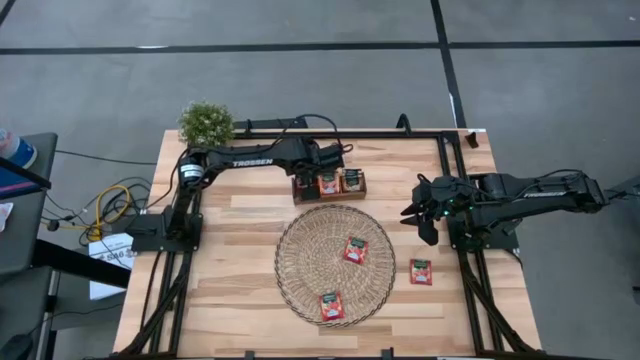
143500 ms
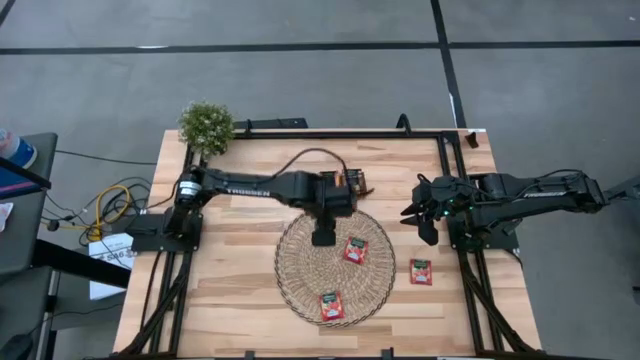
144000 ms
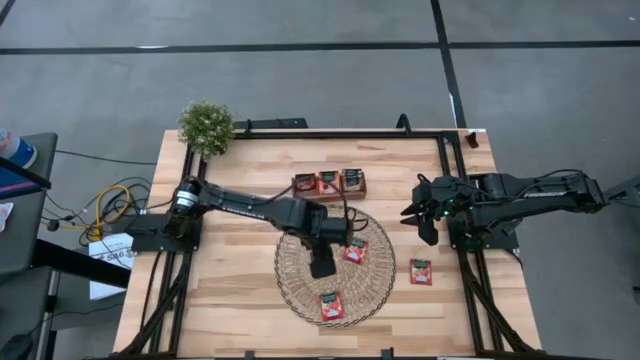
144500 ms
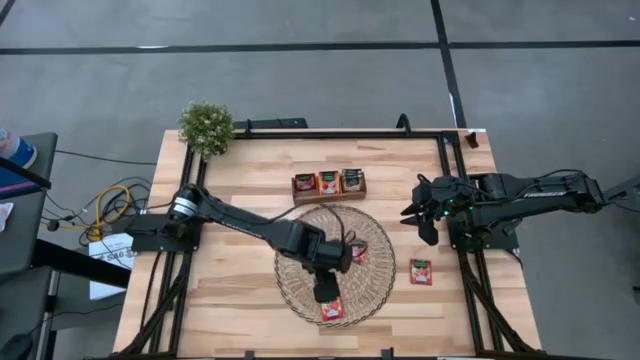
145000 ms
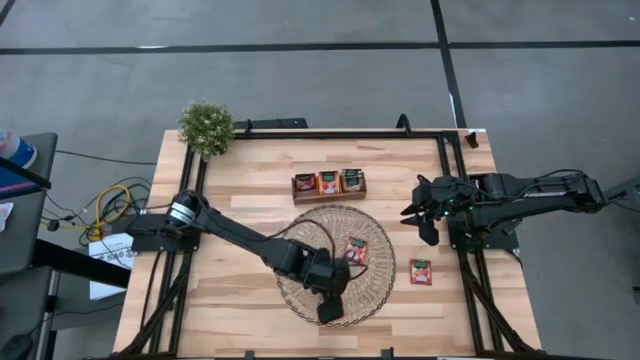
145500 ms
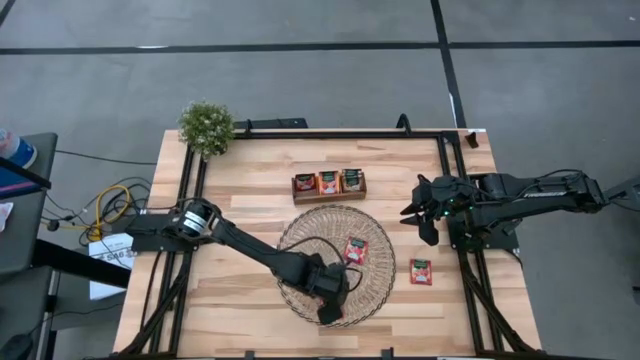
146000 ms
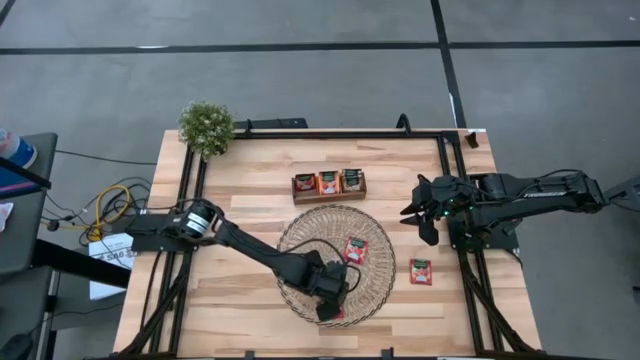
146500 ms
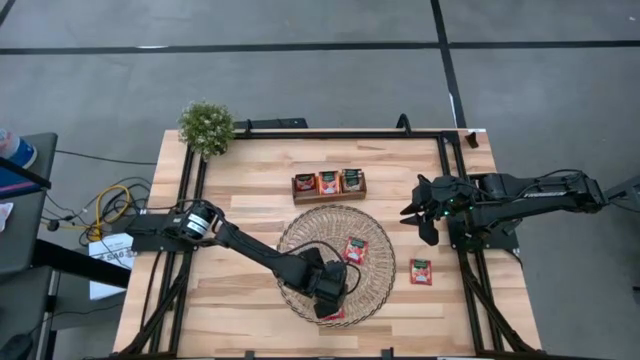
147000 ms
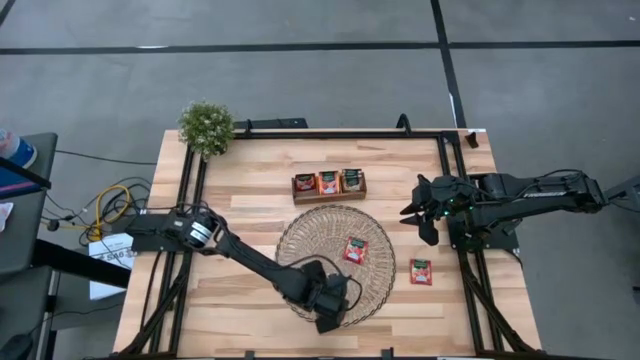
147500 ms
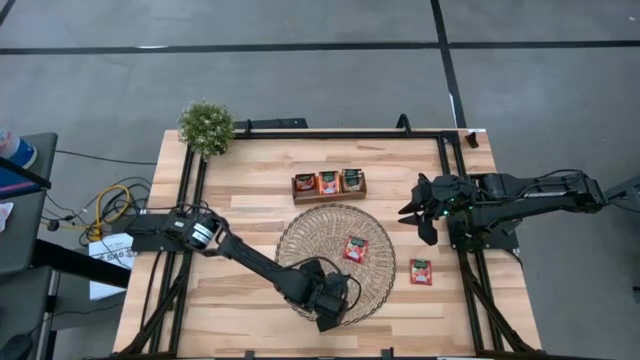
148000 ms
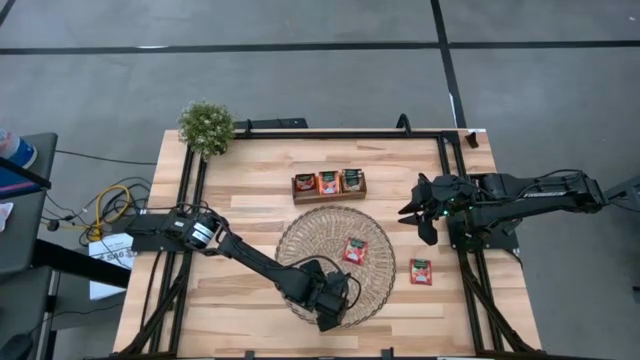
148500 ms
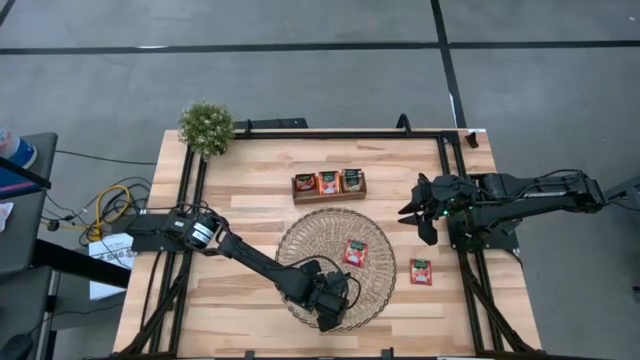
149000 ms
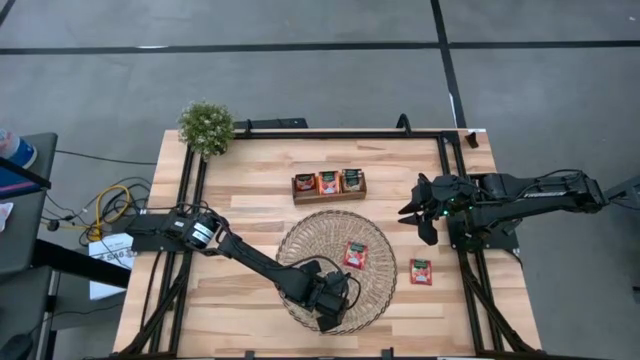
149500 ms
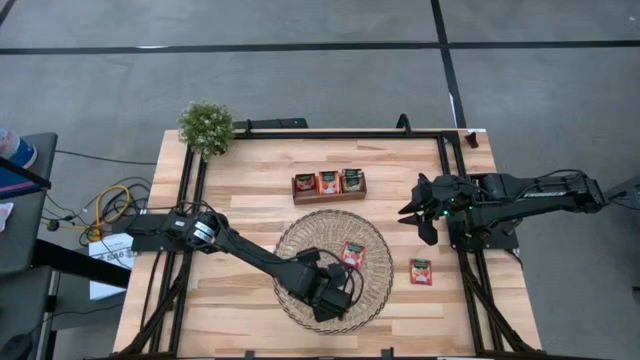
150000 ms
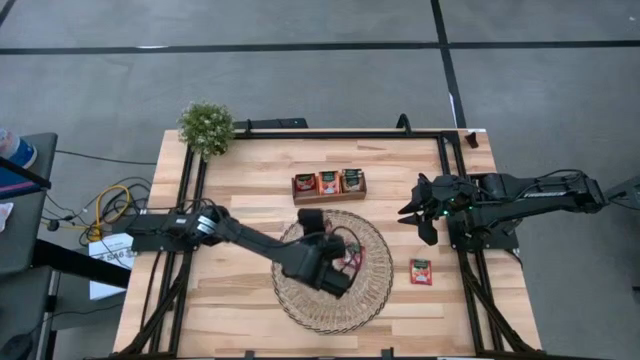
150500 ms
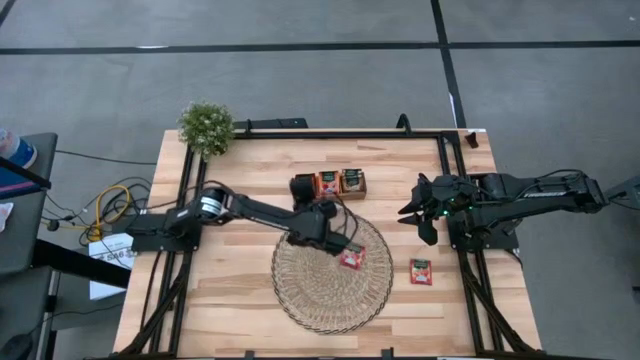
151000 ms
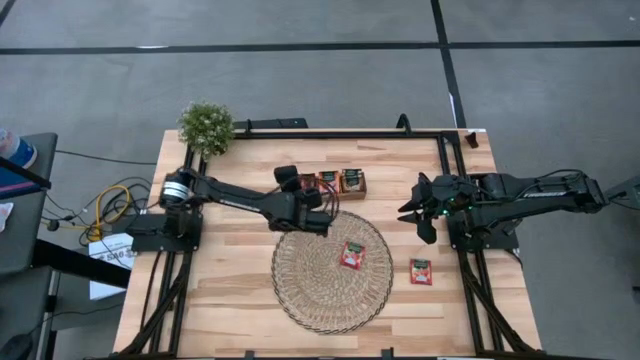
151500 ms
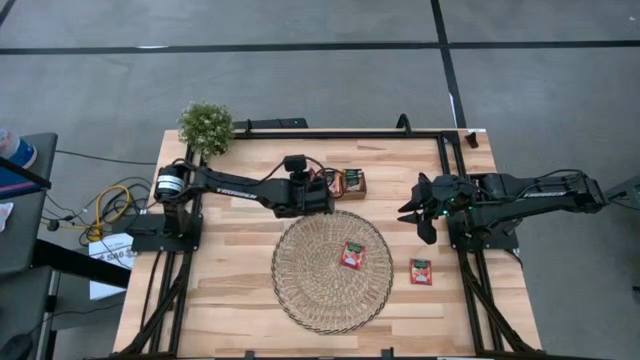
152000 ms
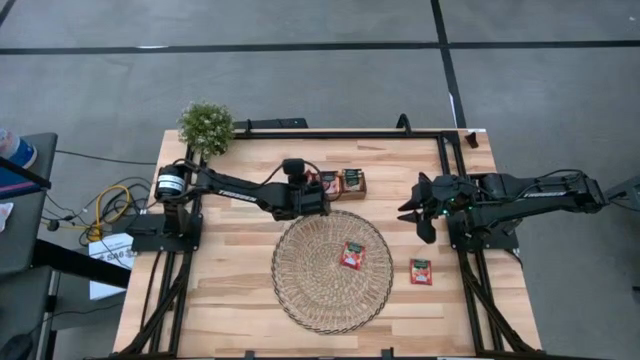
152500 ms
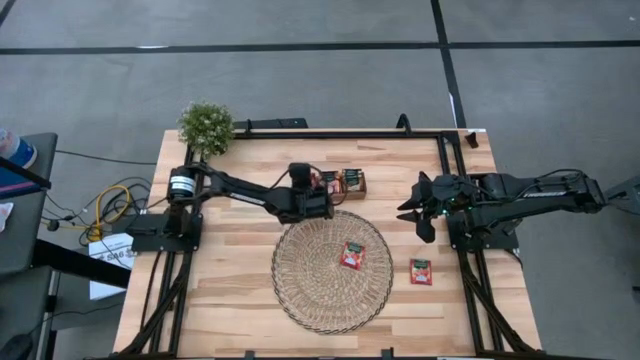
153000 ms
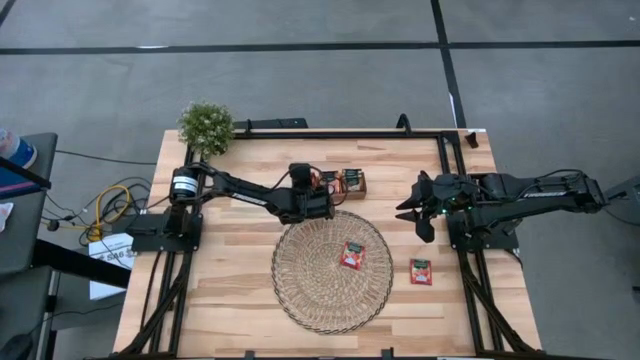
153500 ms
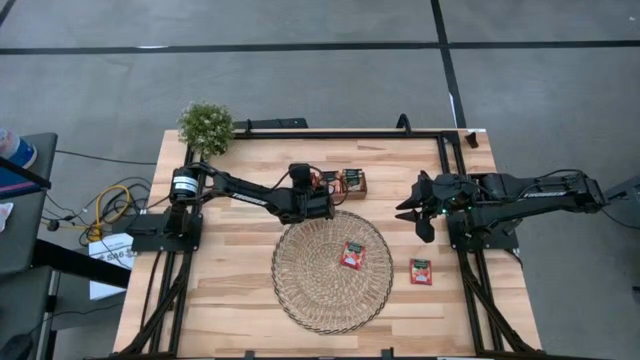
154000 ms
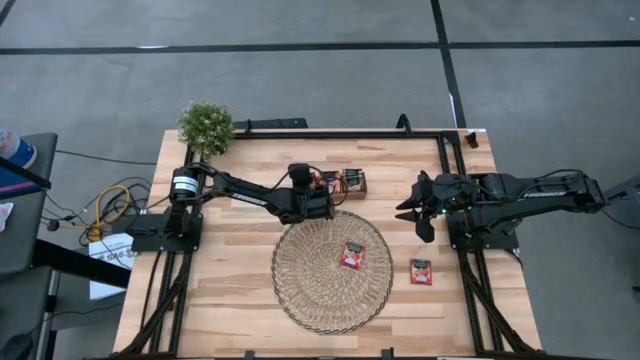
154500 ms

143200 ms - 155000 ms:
Task: Pick & Place Tea
Put the red tea bag into the wooden organizer

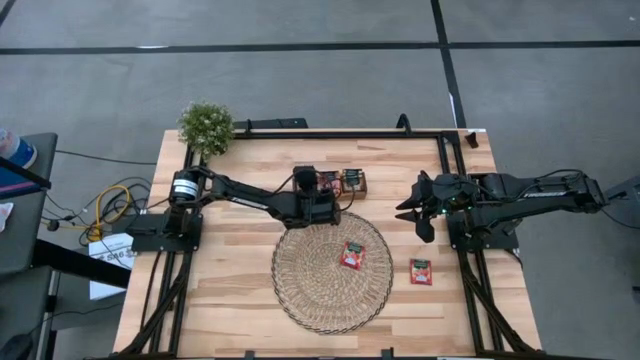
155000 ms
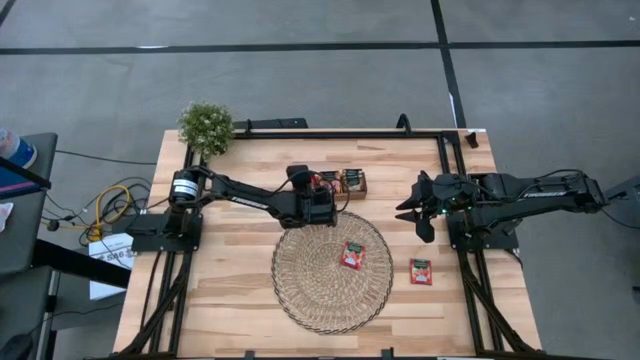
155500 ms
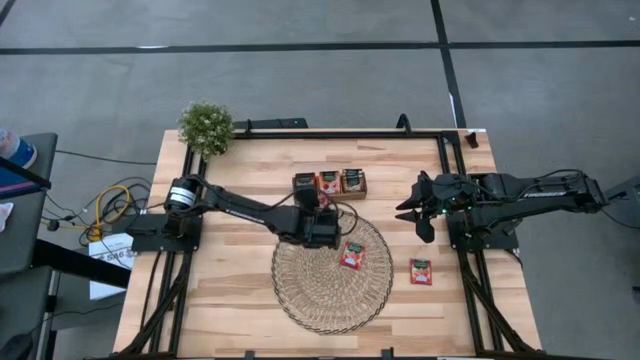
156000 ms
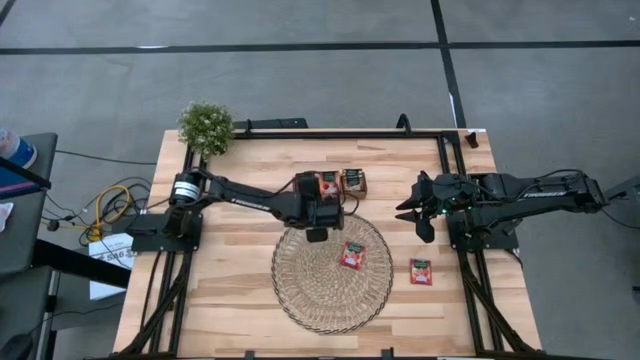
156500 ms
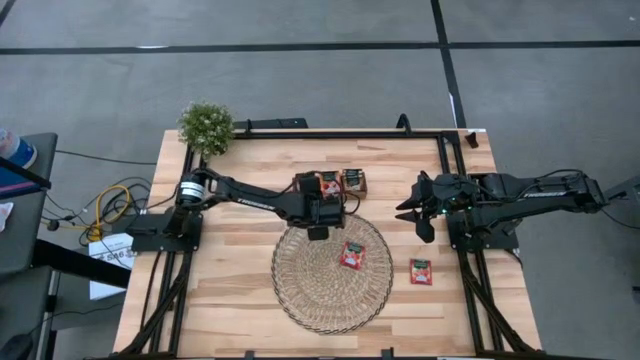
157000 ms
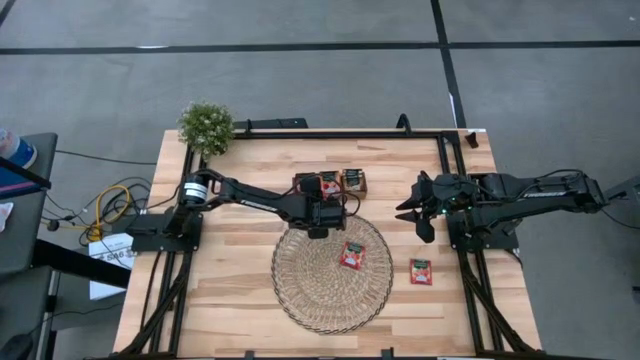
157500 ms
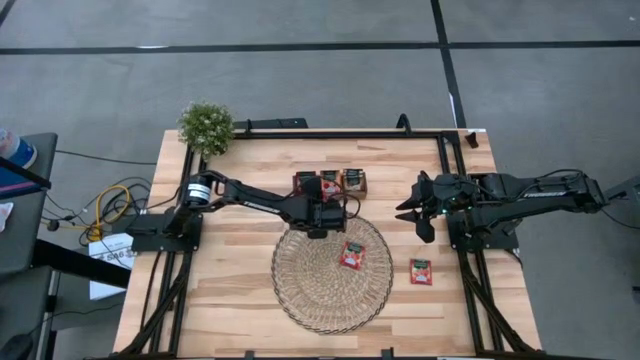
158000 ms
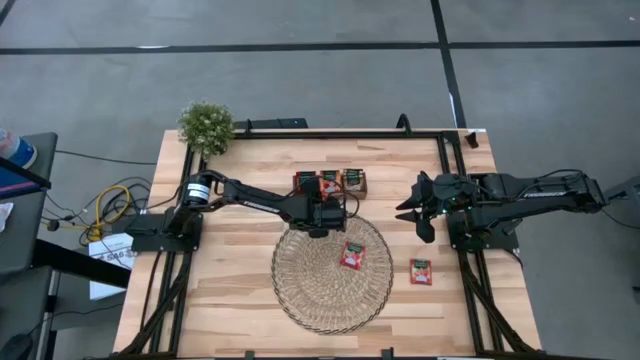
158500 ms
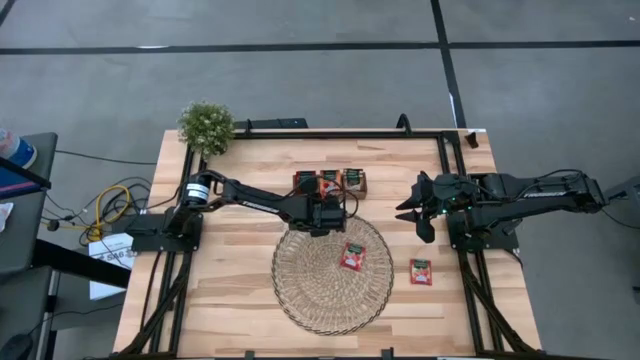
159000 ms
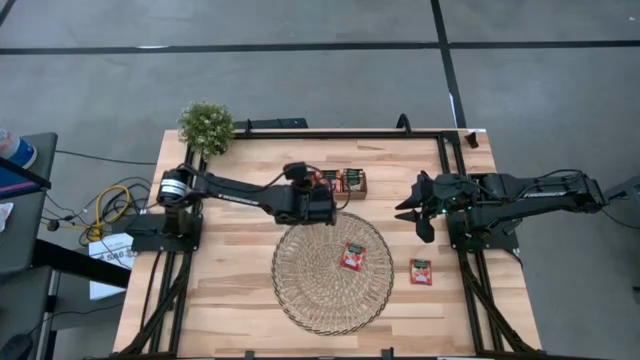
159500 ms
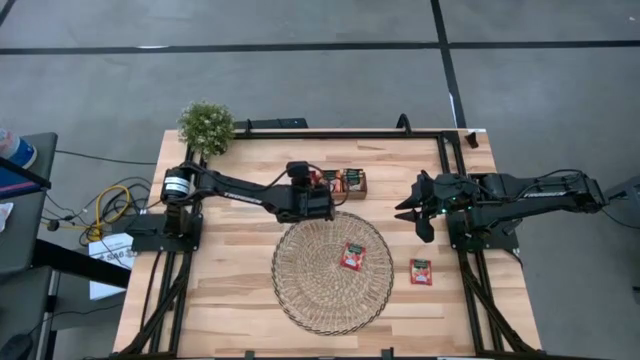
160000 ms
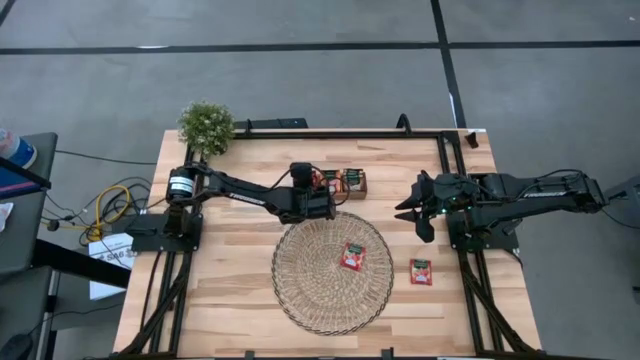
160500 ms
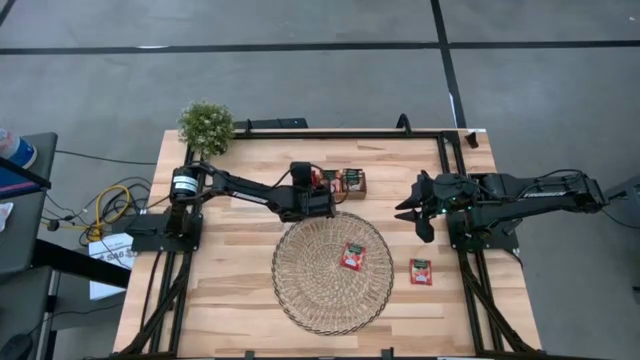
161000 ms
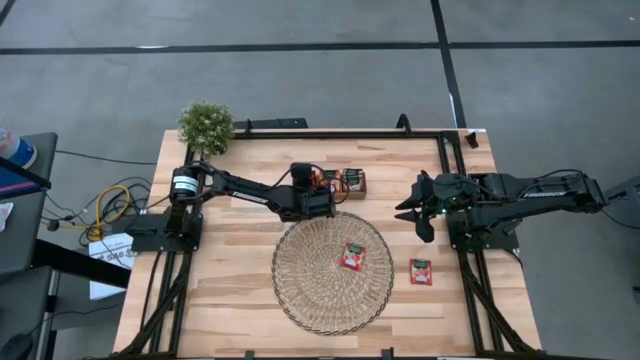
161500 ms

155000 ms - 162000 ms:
Put the red tea bag into the wooden organizer

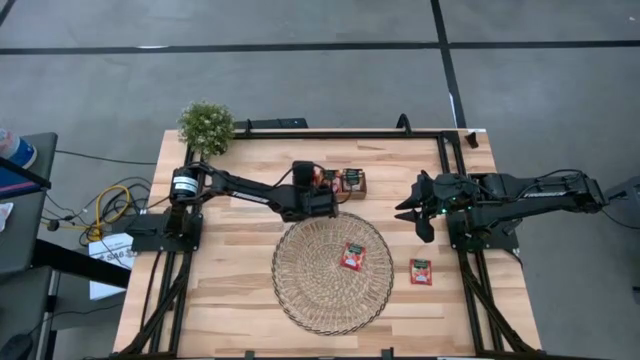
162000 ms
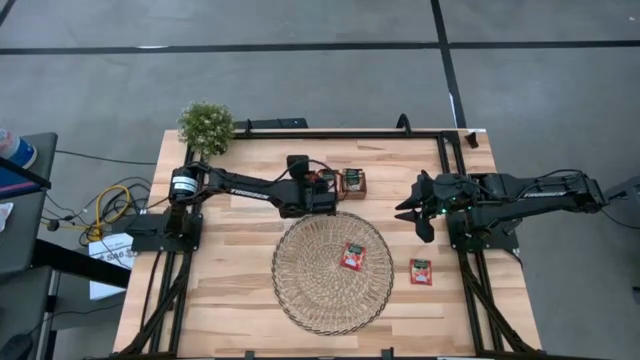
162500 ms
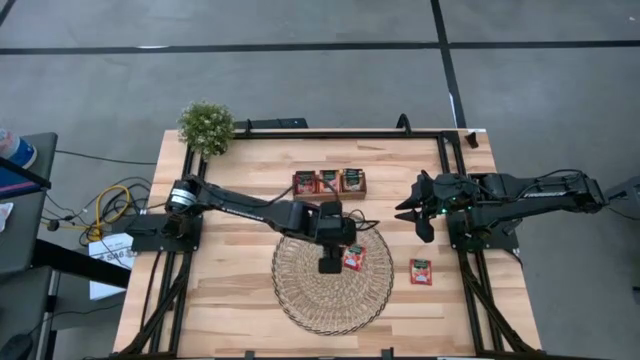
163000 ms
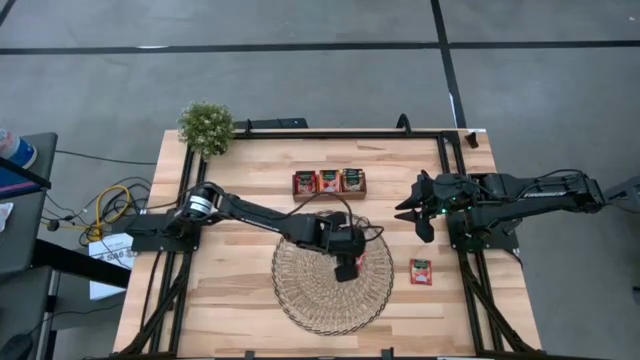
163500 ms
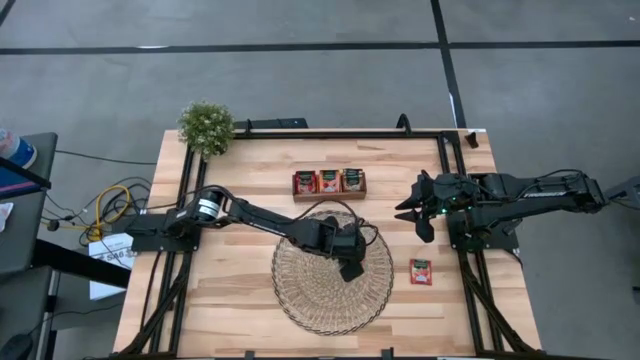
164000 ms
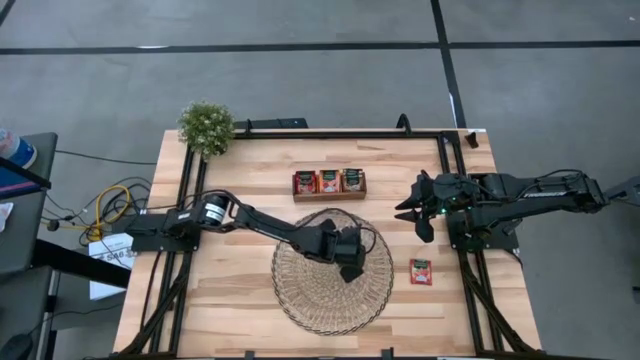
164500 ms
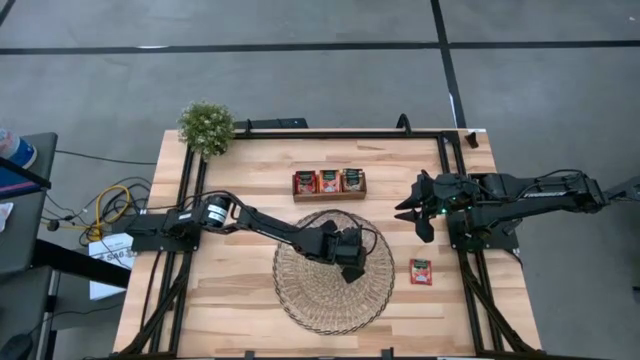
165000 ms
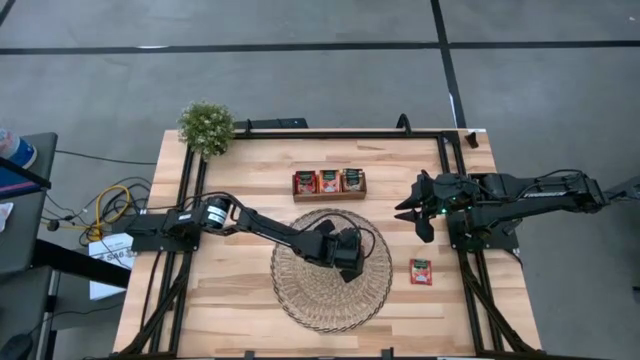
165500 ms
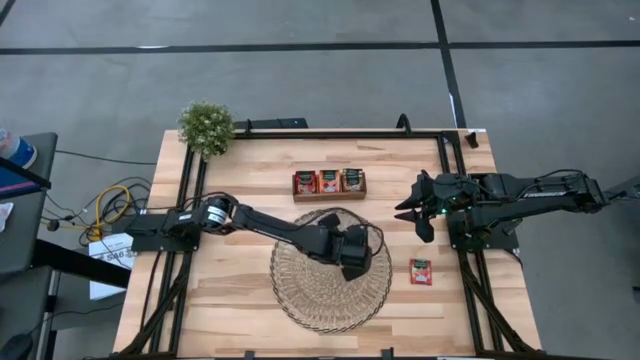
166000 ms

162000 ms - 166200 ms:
Put the red tea bag into the wooden organizer
